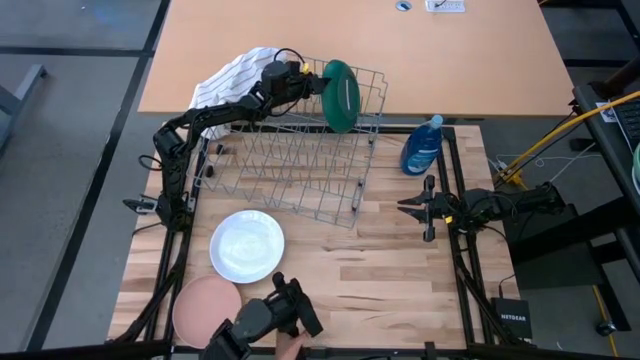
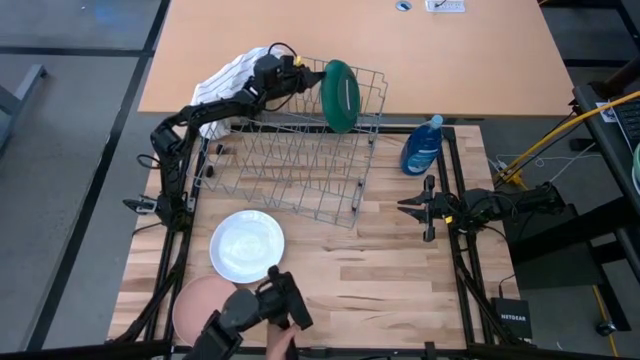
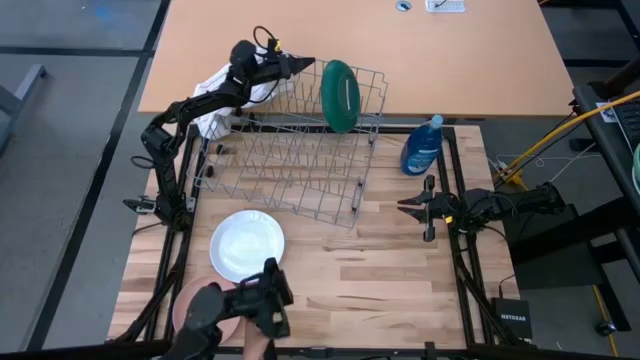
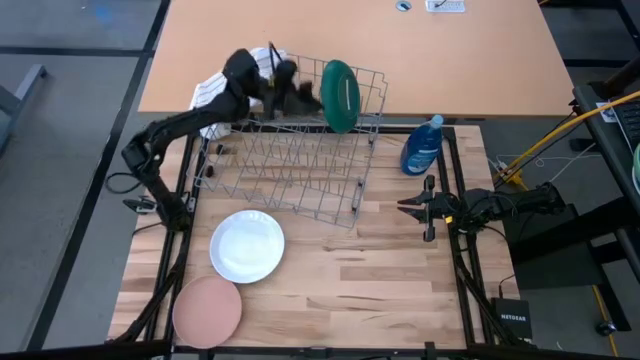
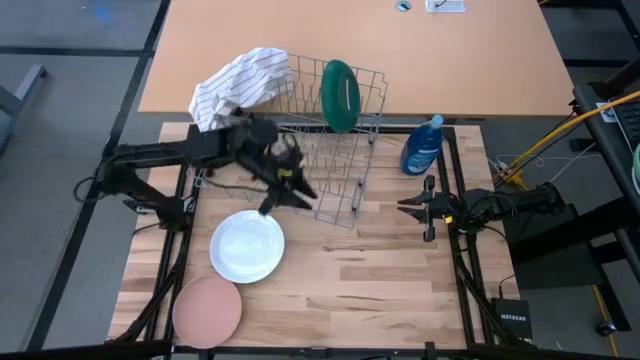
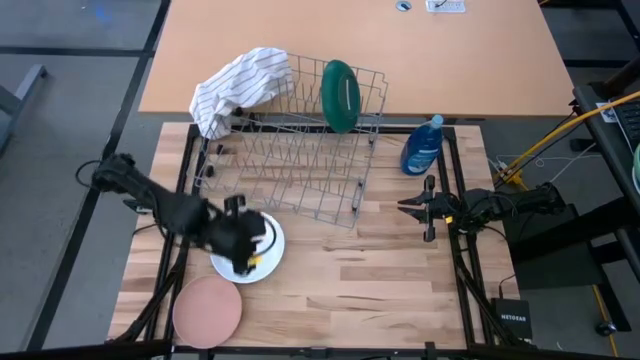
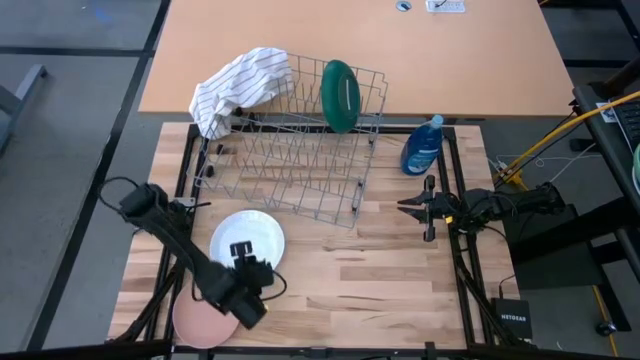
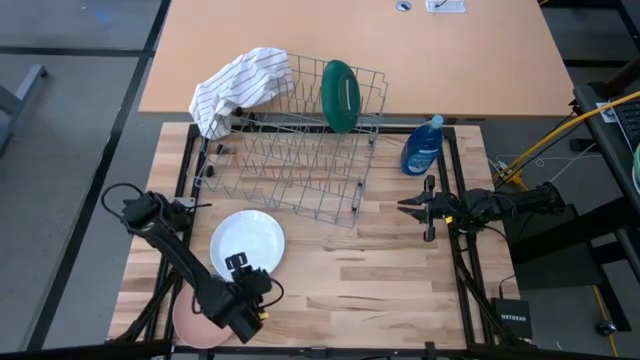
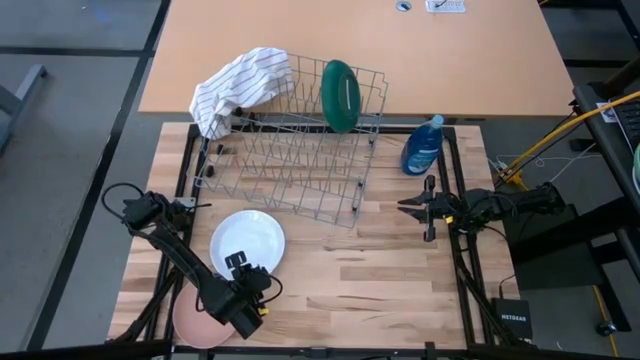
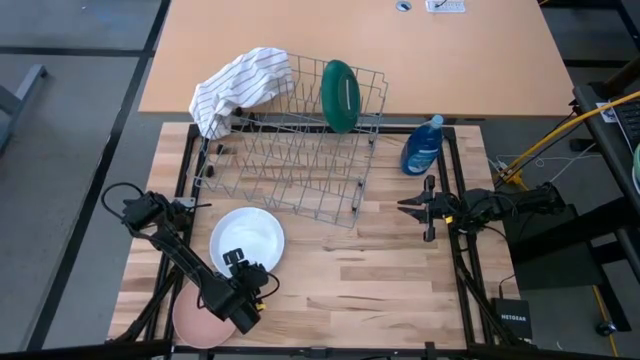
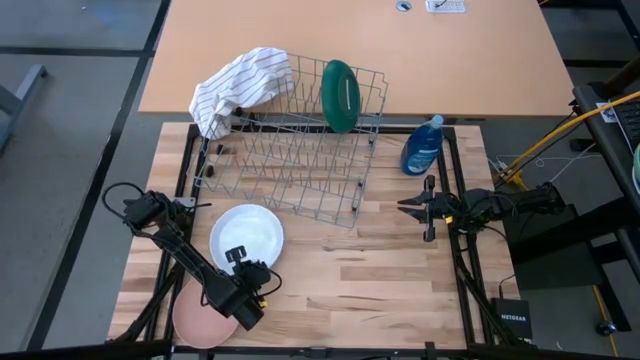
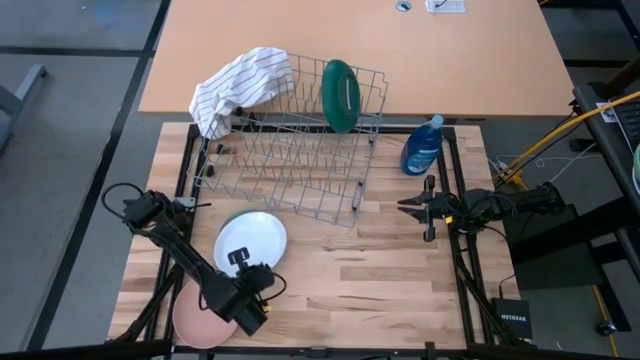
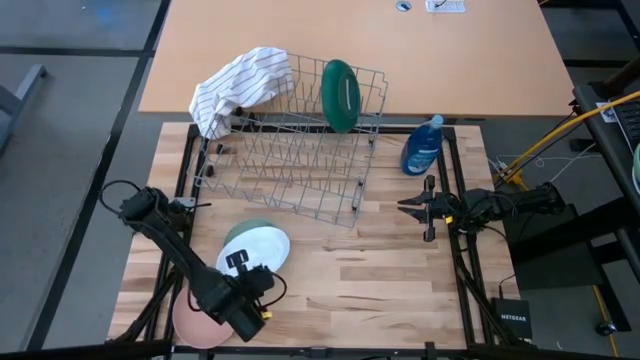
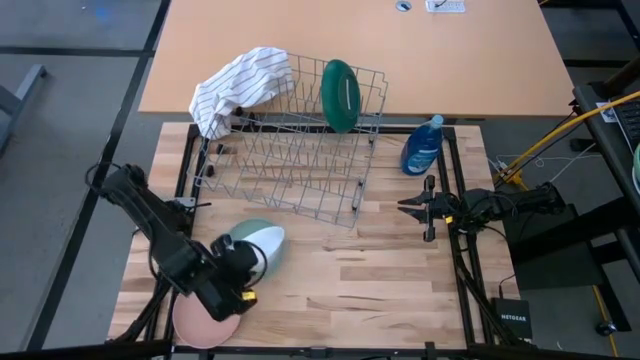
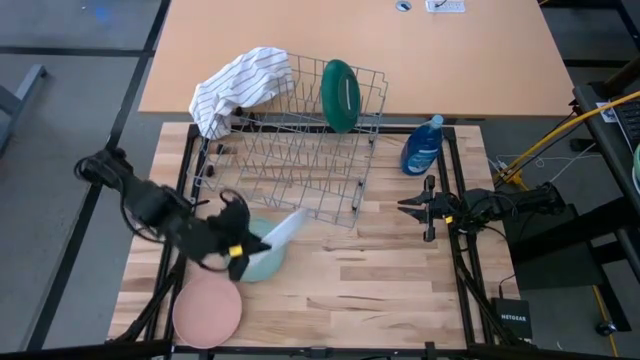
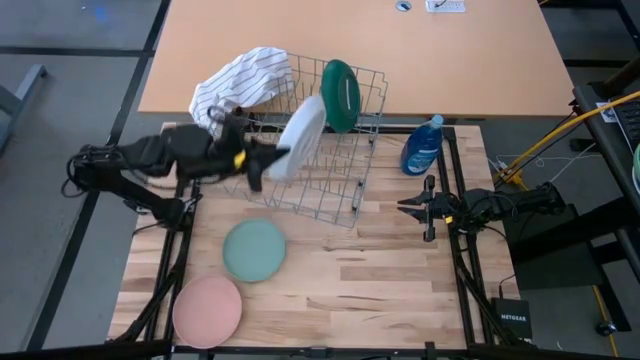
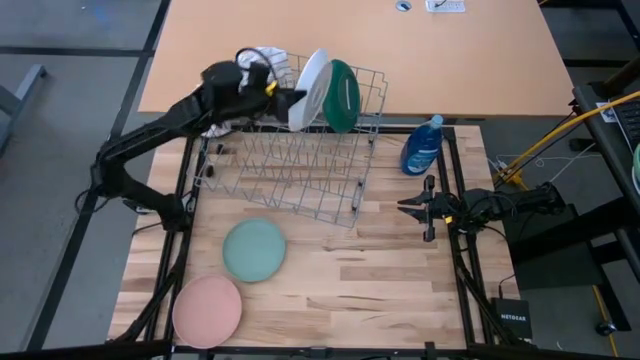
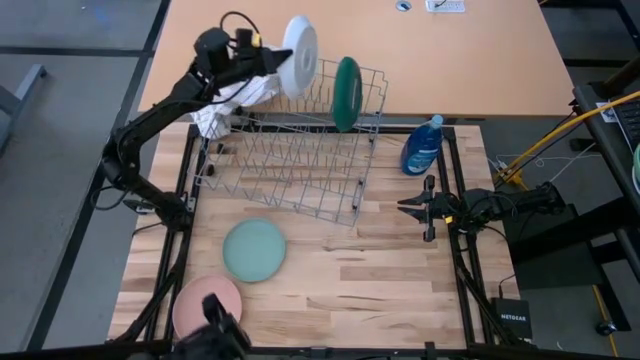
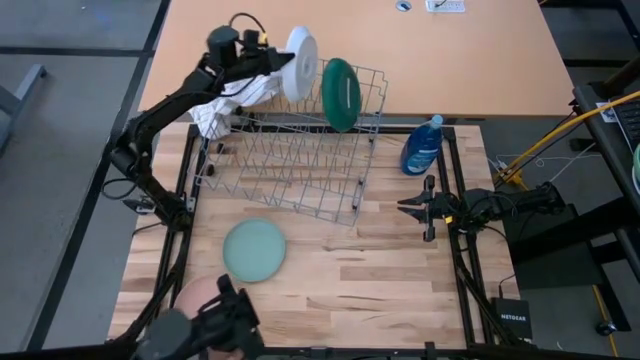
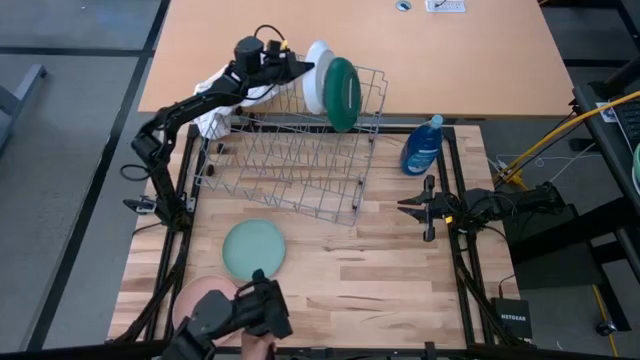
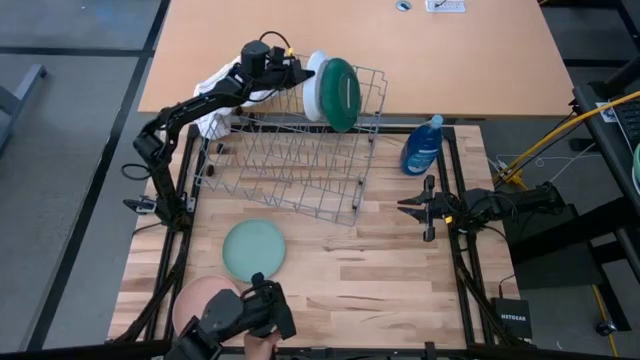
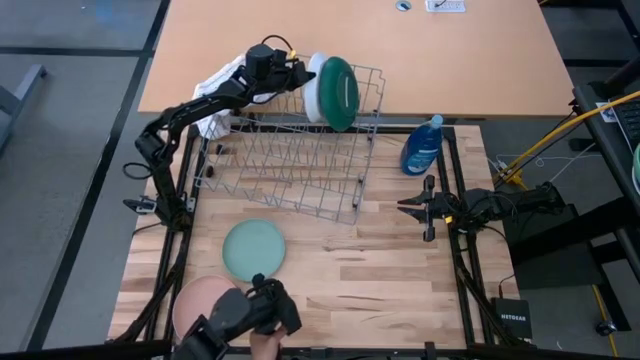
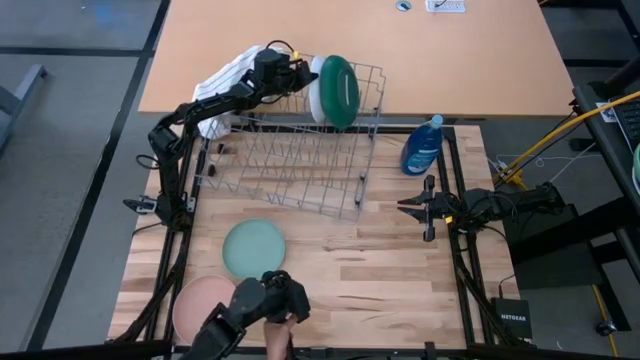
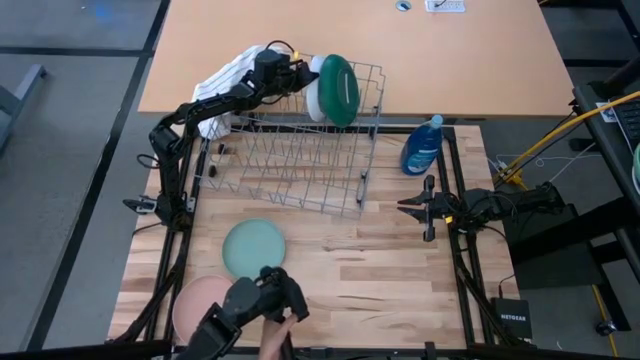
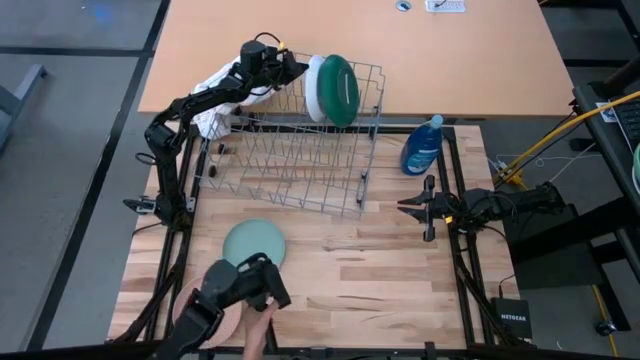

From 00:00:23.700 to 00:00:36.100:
Task: Sort dishes
Put the white plate into the dish rack

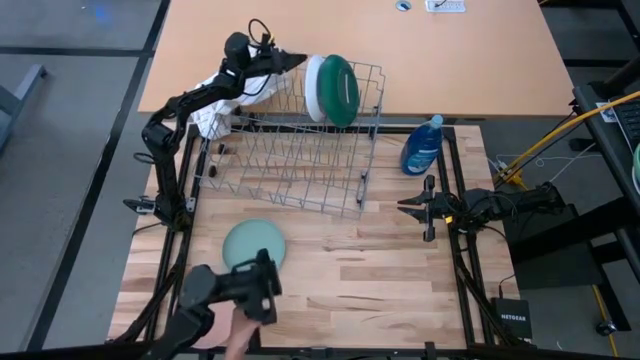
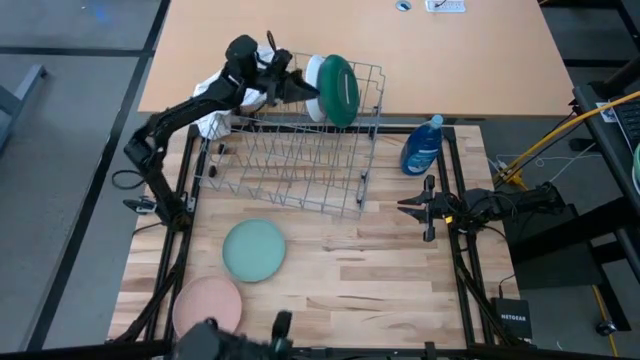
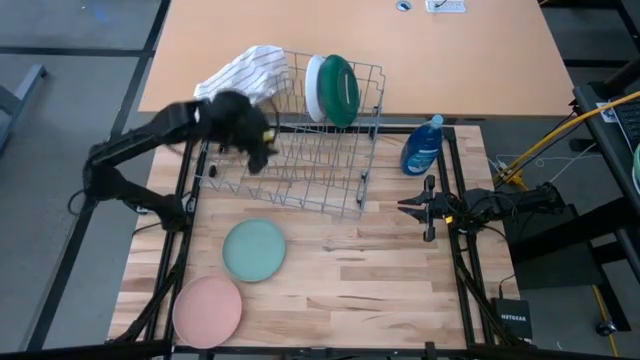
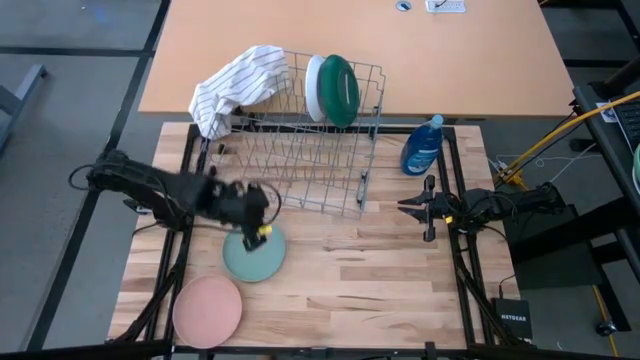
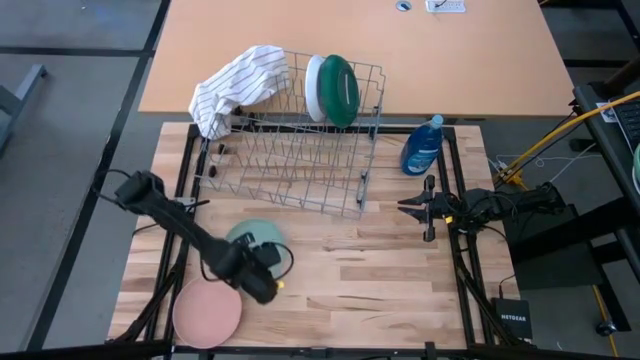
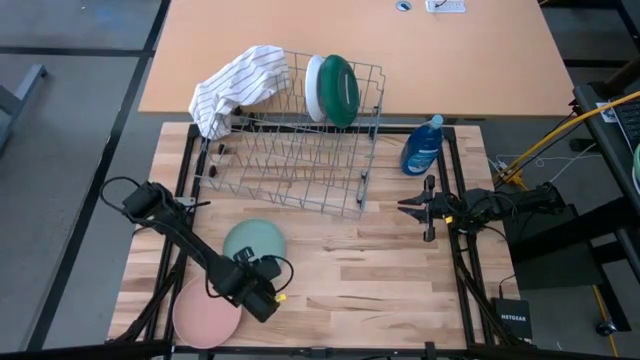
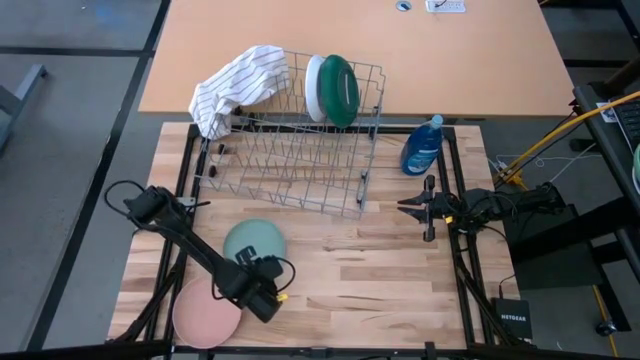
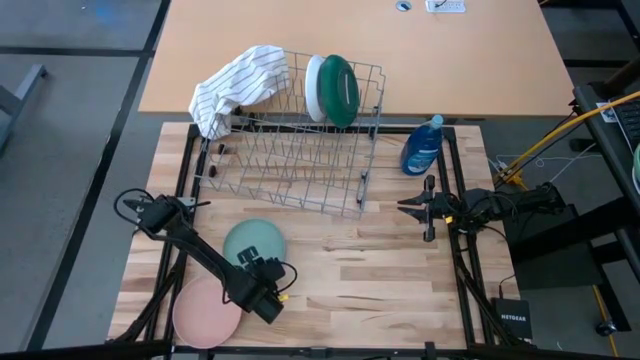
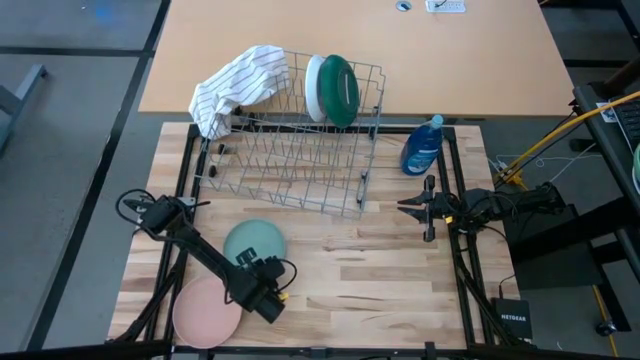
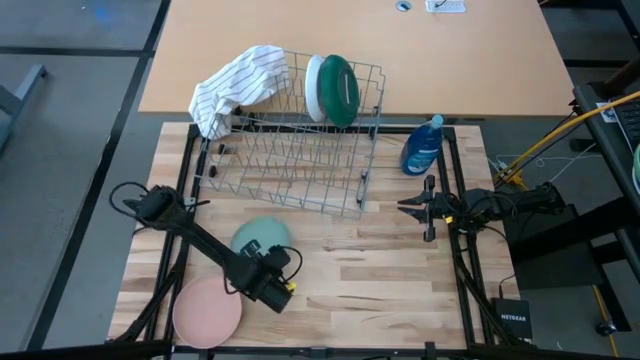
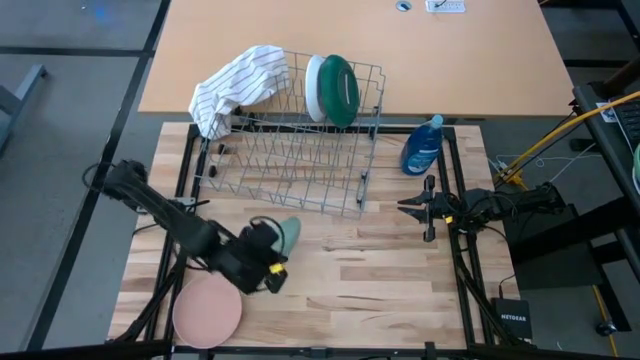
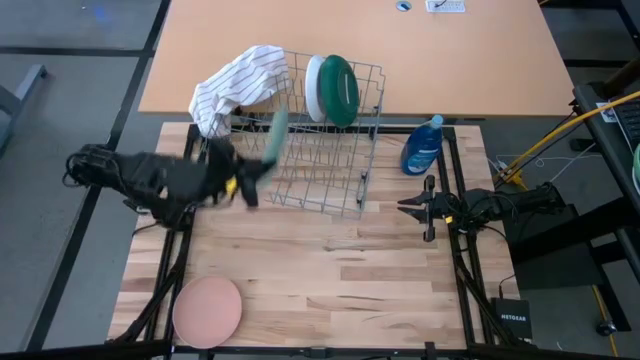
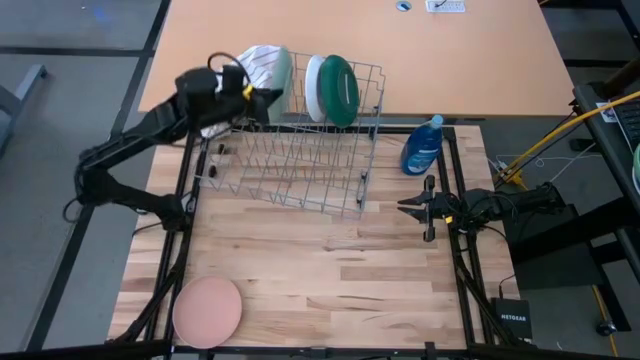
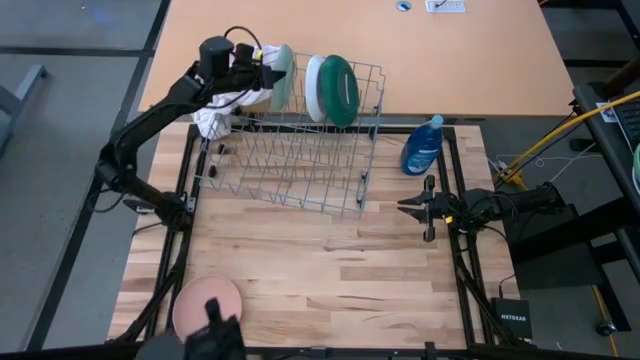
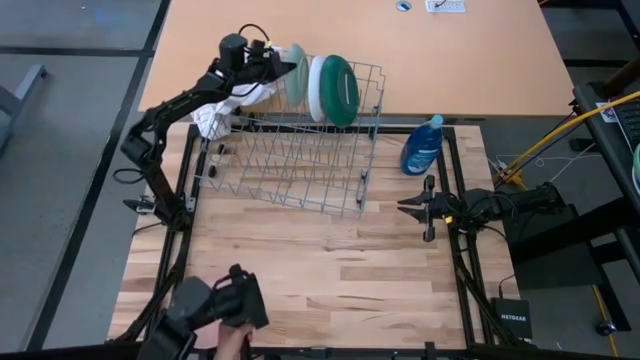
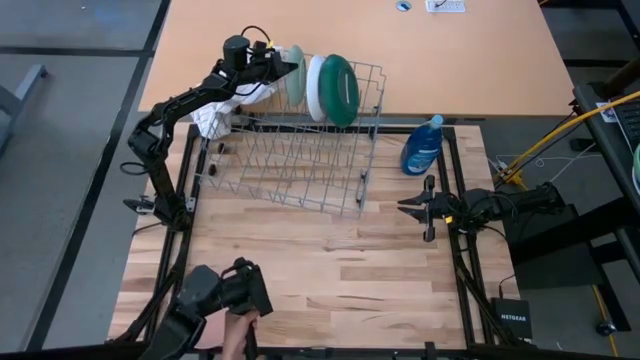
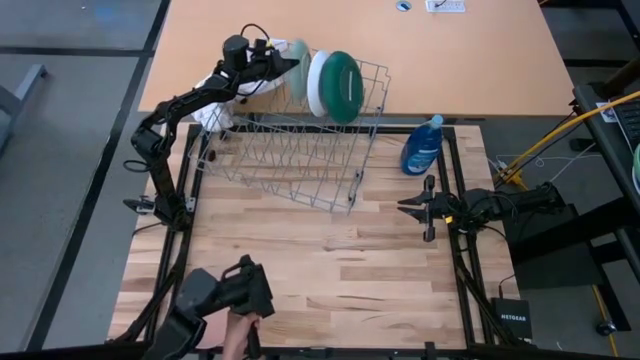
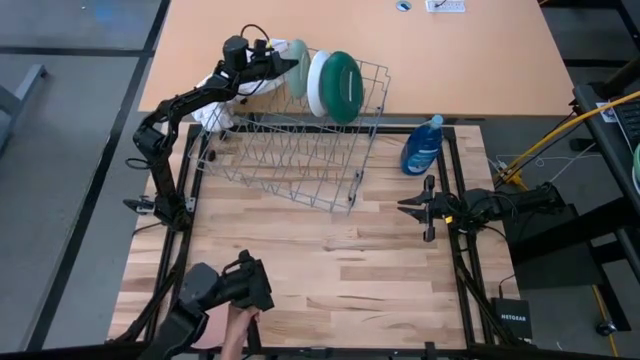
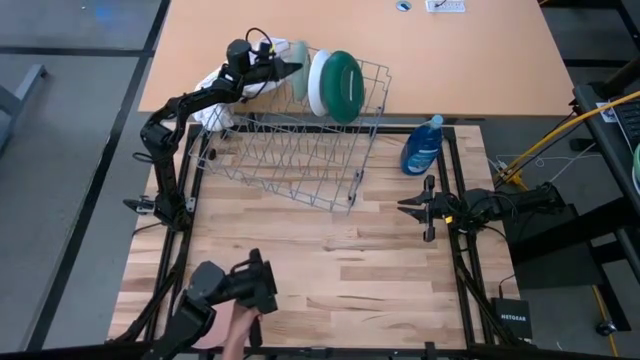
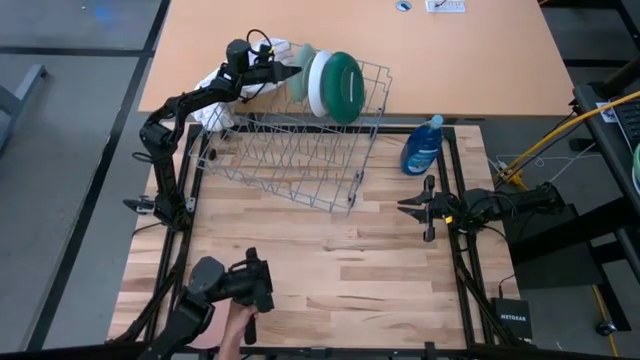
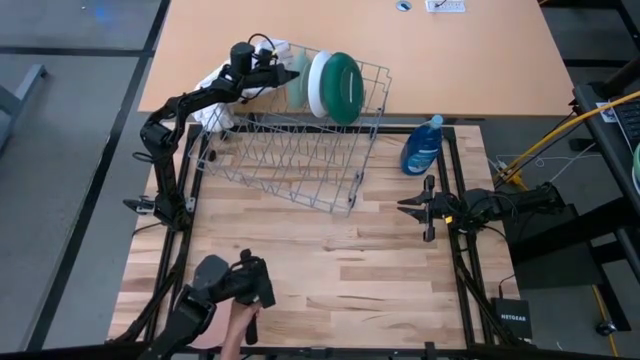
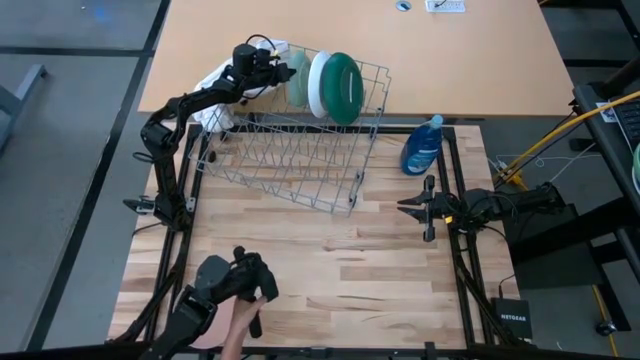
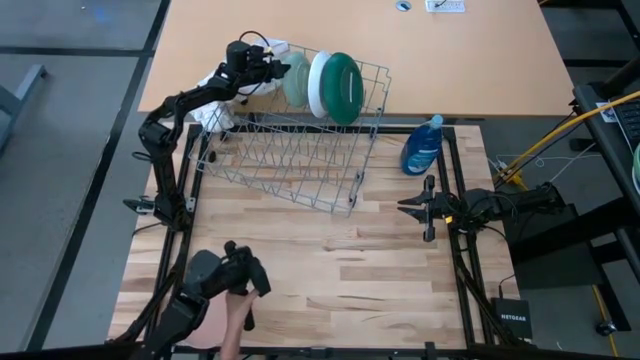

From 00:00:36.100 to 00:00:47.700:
Put the light green plate into the dish rack
